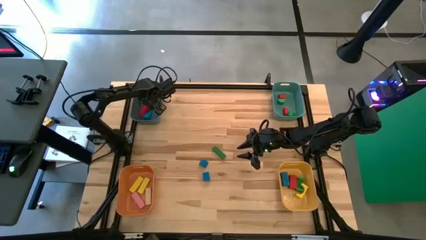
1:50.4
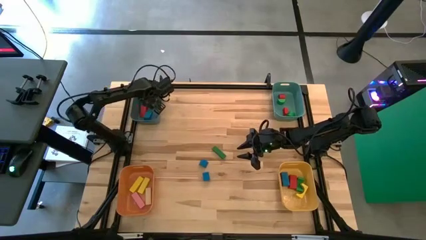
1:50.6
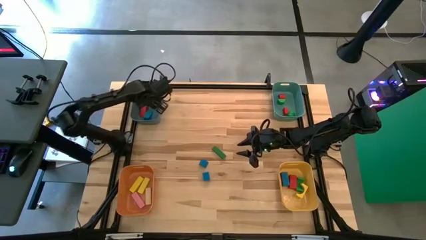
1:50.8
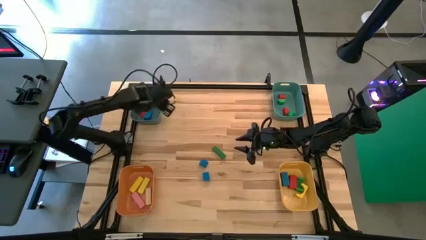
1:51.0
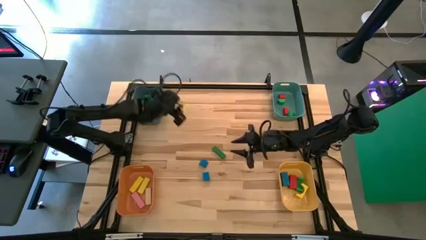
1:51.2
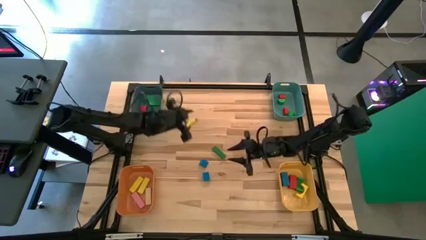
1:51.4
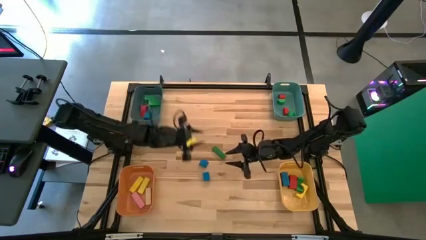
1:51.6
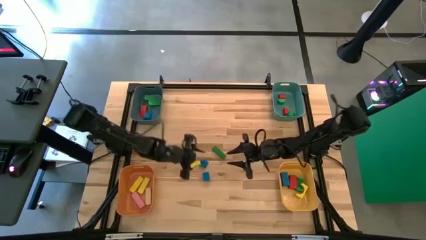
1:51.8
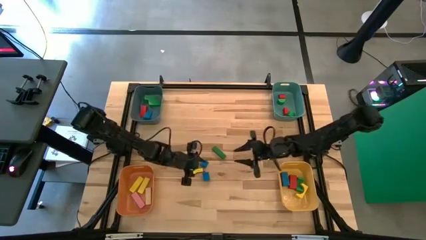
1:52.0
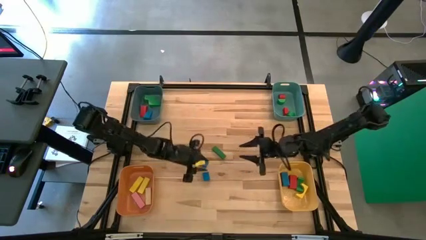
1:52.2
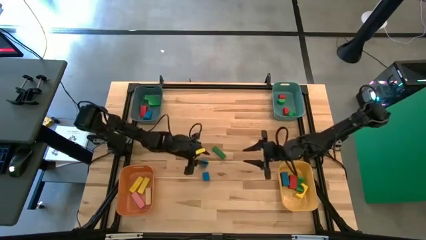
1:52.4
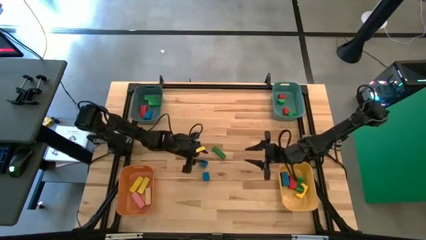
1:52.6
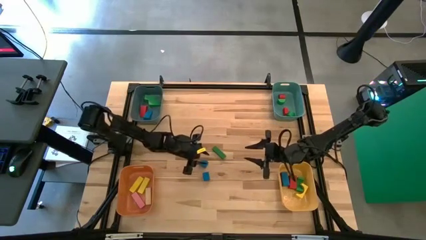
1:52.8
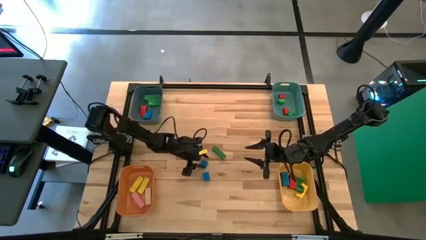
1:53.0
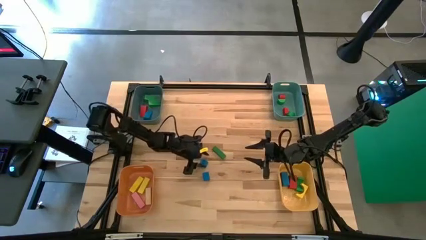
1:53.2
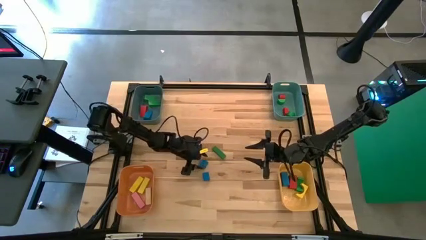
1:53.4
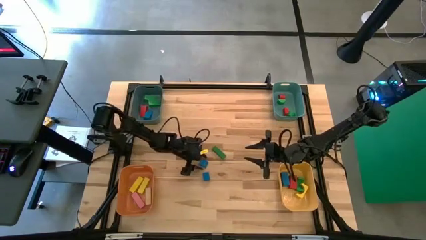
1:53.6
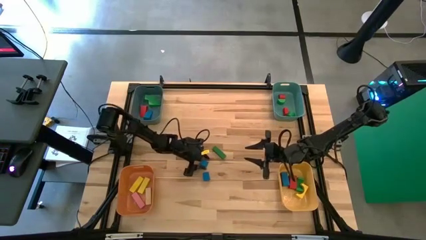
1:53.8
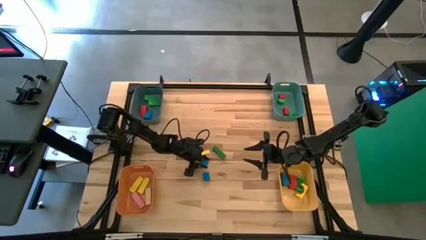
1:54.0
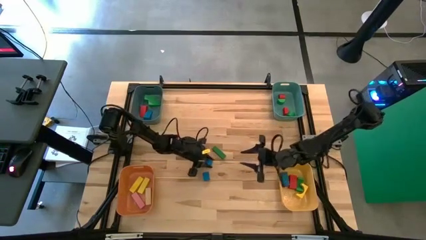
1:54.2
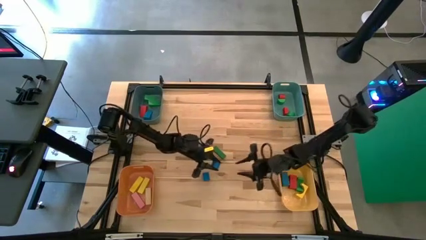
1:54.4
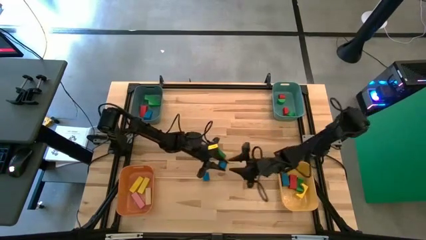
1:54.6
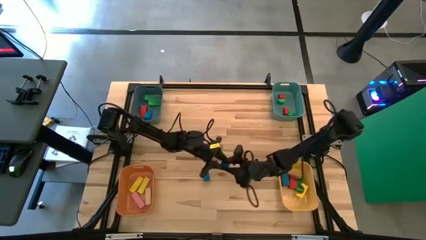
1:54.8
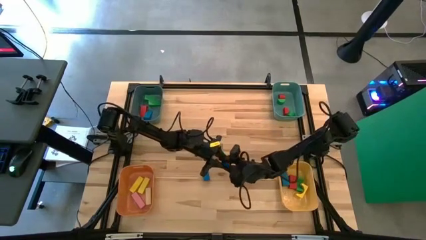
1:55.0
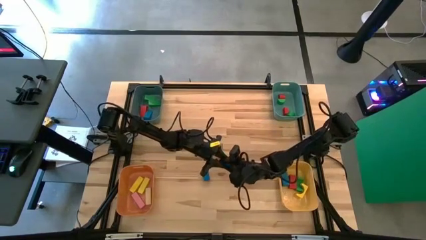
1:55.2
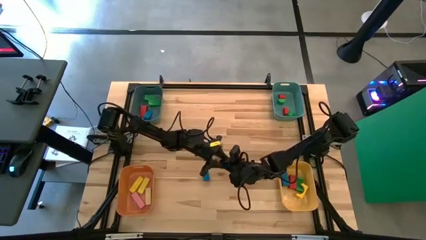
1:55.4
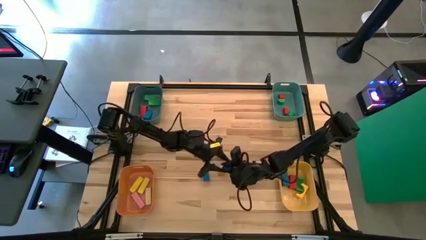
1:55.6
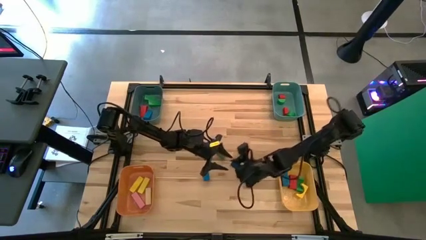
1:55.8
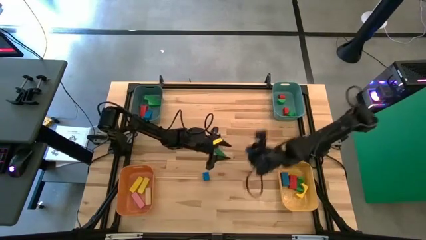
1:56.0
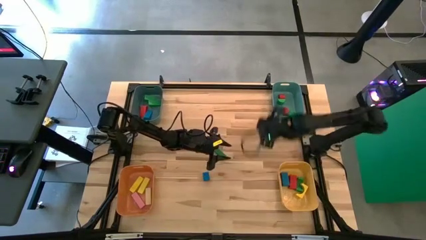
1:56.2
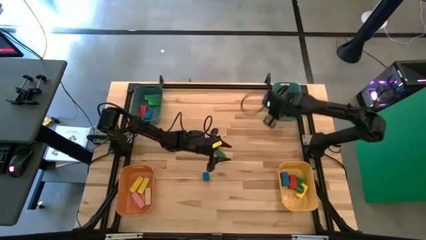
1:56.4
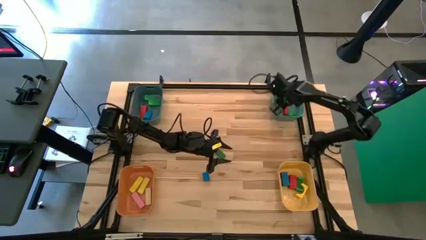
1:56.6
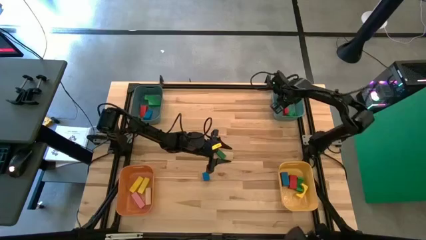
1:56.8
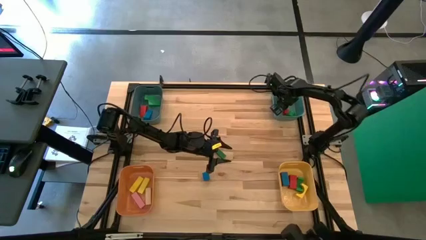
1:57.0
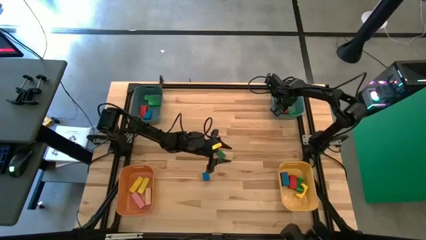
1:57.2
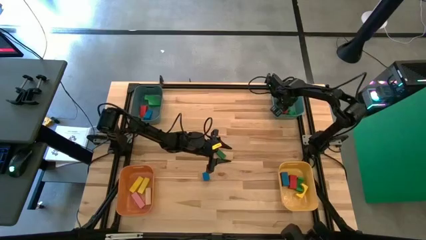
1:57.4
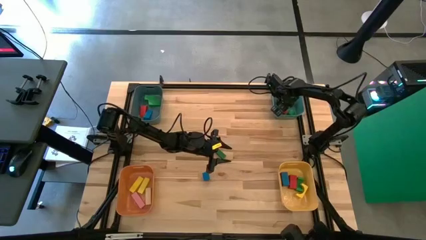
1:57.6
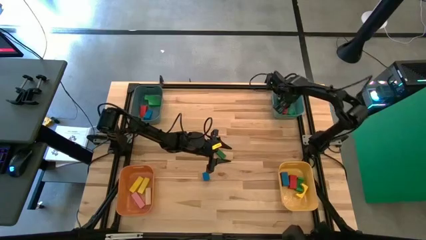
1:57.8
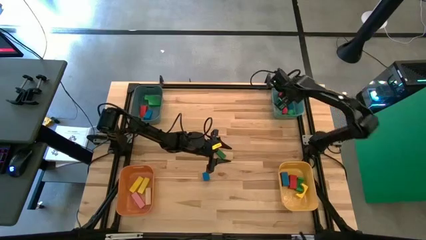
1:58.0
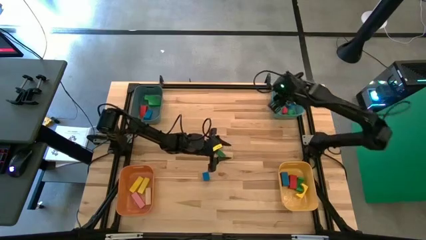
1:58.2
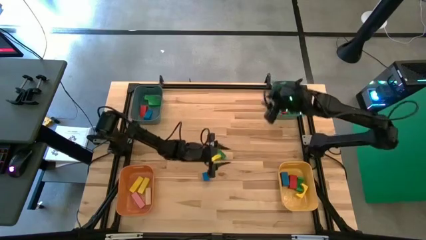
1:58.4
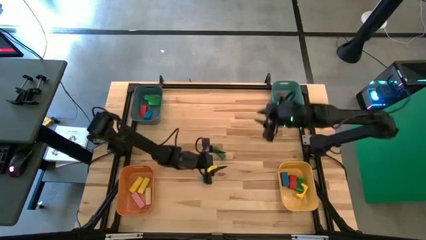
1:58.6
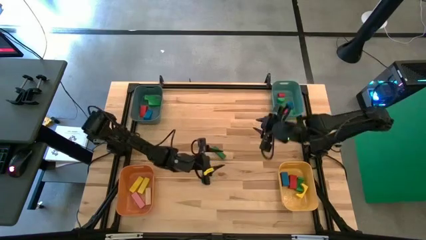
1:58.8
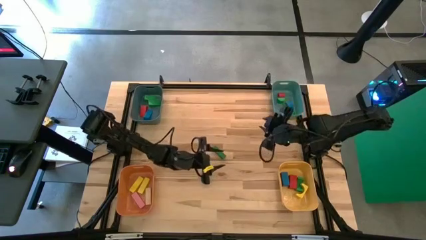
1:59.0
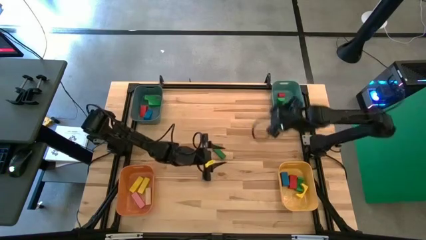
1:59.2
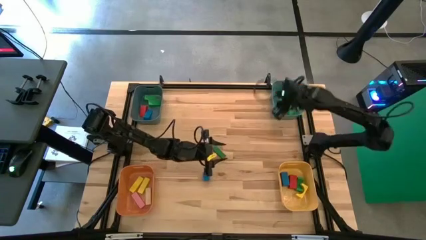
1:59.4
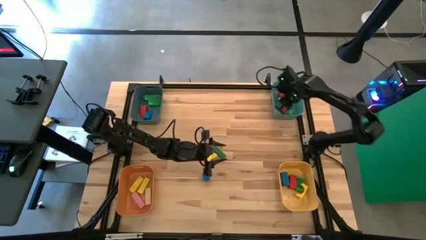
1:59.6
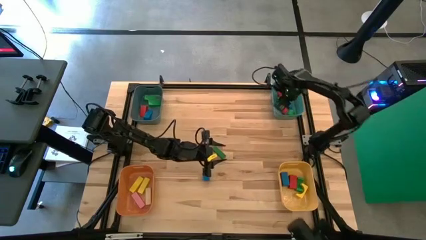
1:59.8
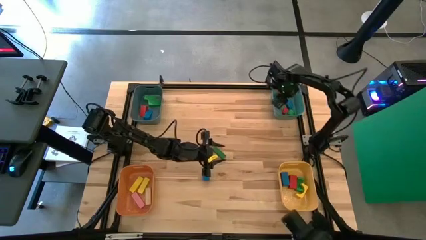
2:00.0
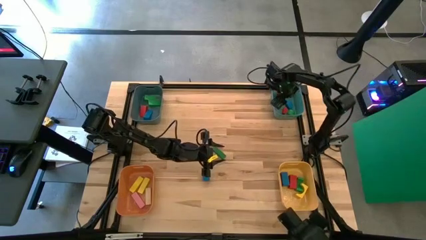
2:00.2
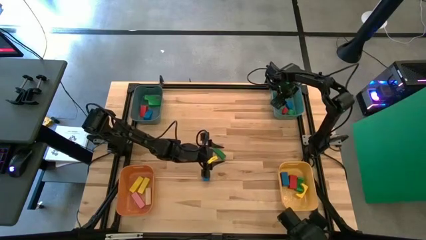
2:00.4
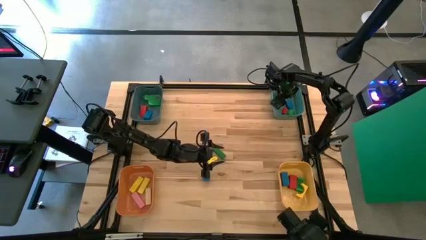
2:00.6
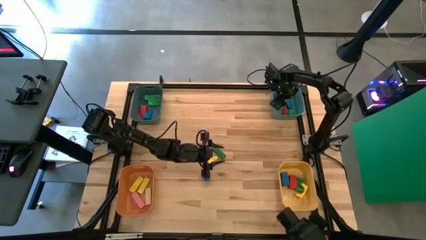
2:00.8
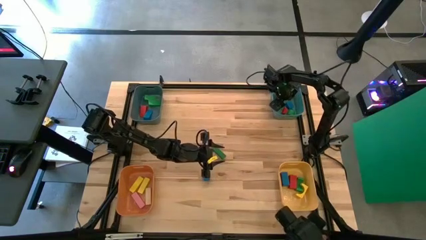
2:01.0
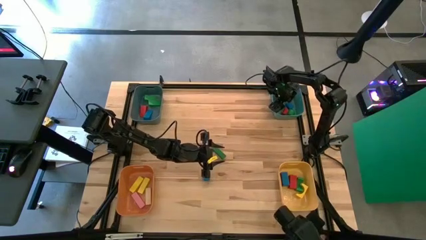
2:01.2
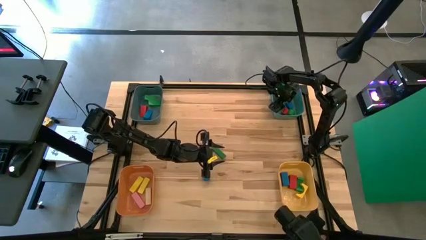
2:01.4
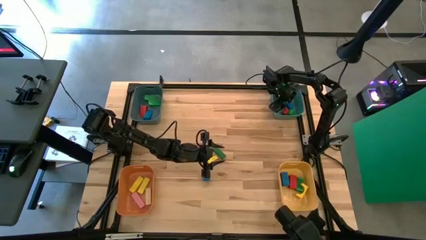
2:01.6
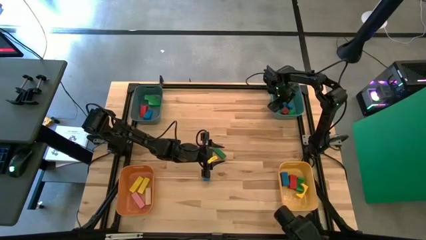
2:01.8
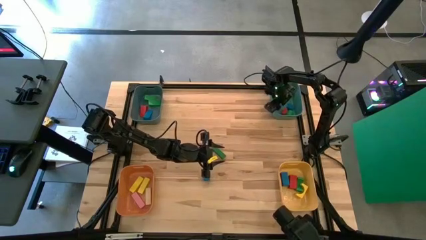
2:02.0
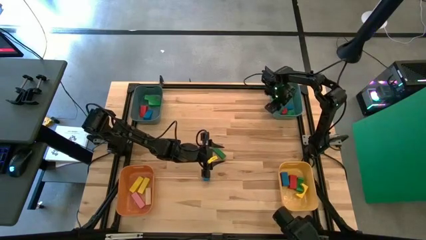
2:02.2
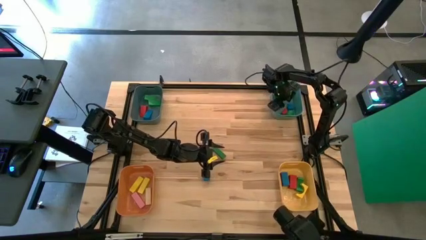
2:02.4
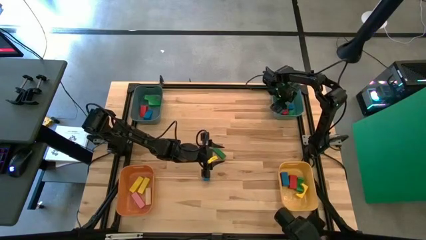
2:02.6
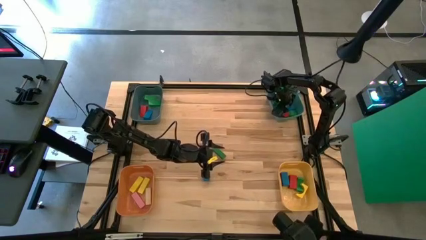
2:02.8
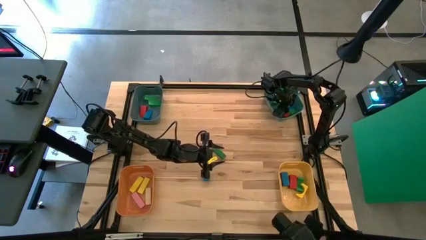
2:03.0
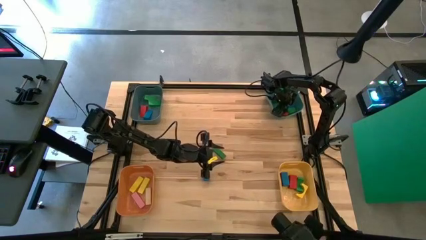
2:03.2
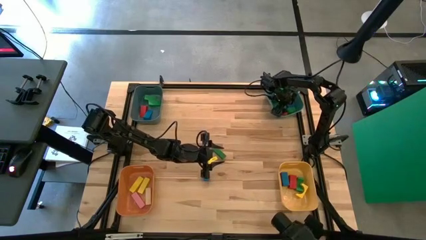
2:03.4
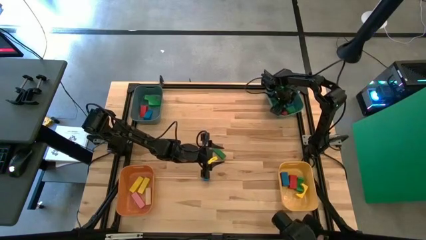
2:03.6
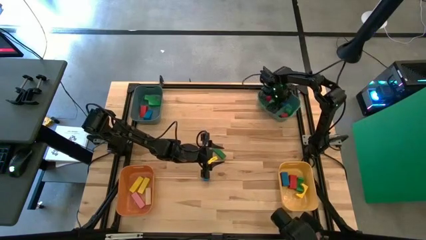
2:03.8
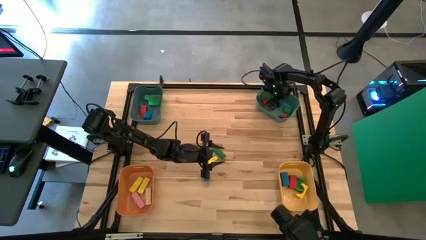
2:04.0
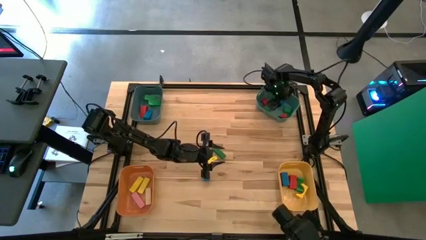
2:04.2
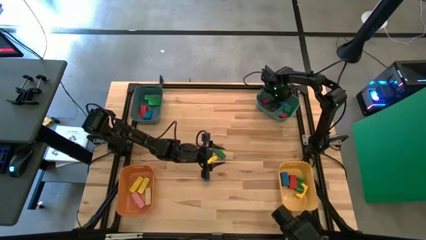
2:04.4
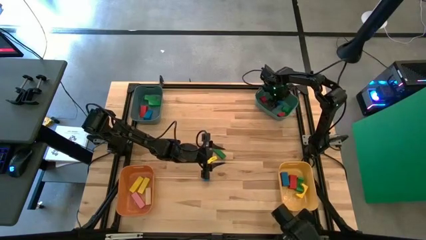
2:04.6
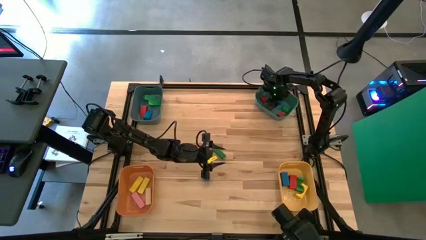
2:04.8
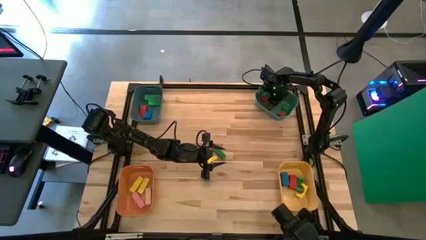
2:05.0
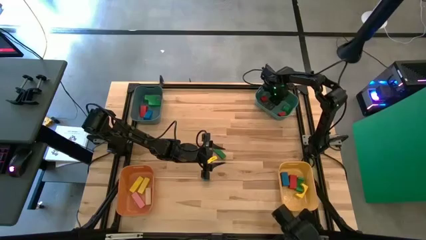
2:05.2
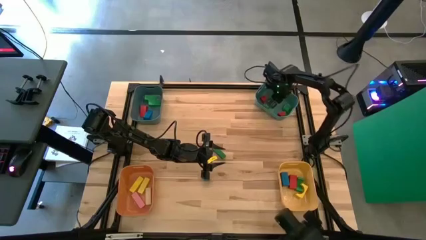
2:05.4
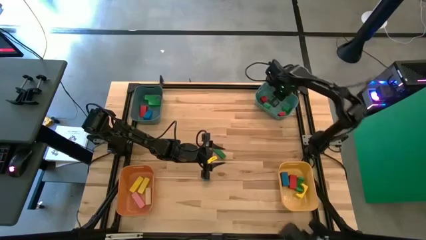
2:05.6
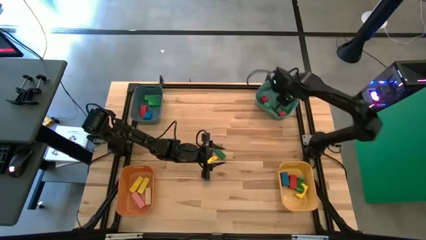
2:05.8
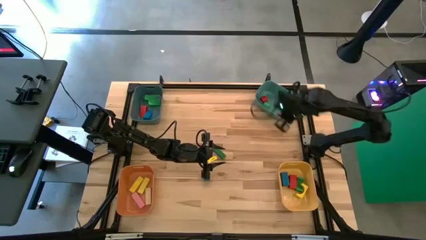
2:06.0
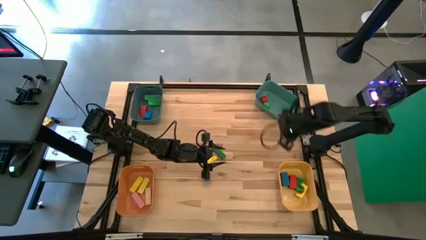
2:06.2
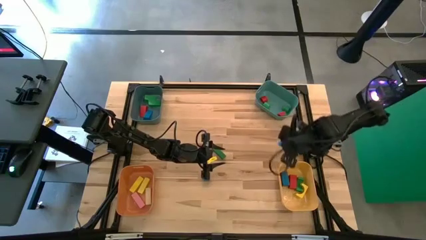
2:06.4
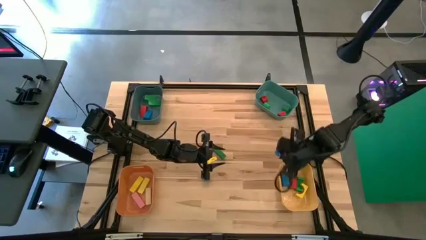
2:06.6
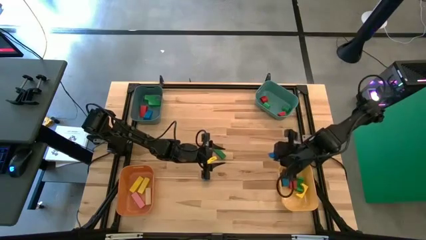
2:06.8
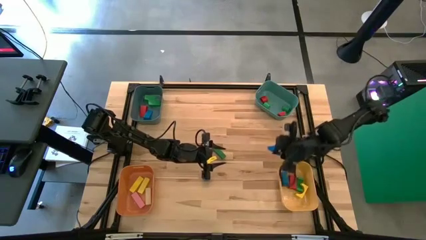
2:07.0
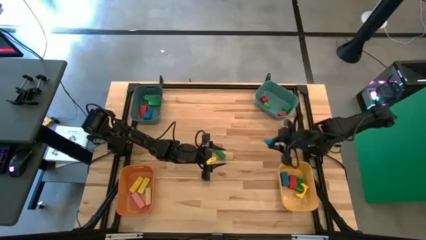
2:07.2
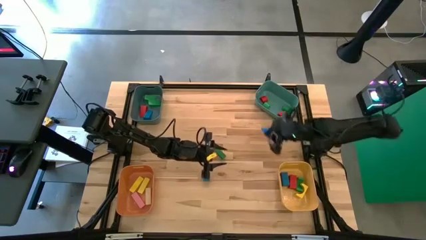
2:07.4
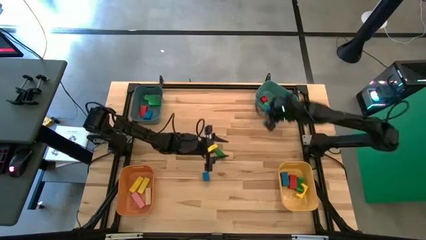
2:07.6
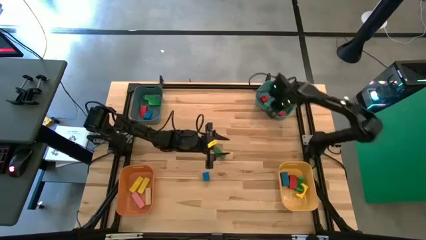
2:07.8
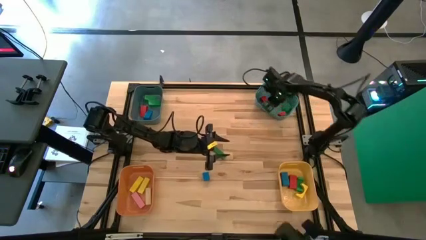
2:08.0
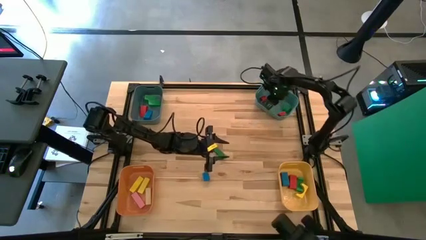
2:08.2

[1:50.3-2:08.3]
Task: Sort blocks by size
Put the blue semicircle block into the green bin
